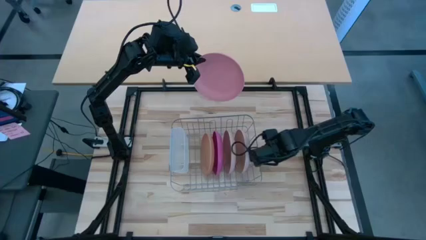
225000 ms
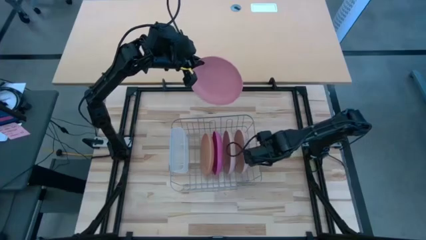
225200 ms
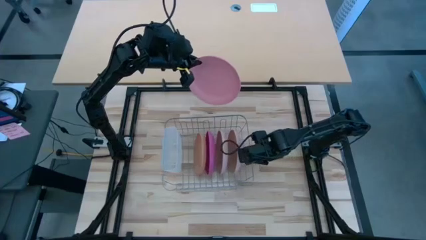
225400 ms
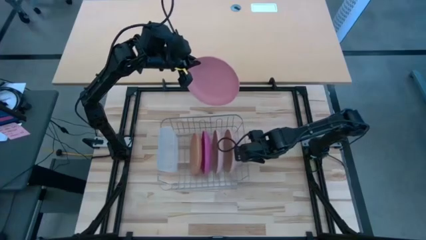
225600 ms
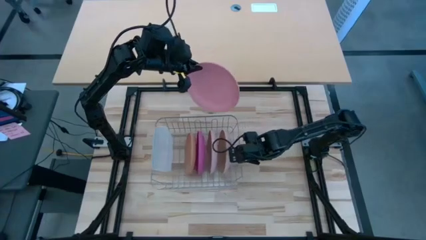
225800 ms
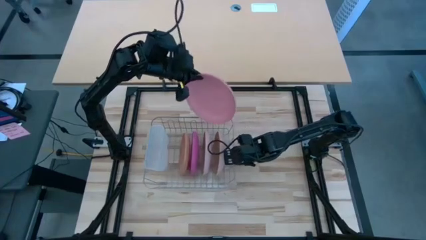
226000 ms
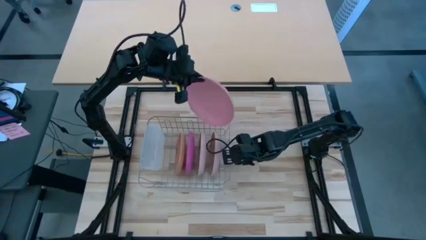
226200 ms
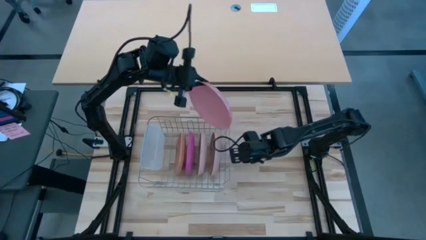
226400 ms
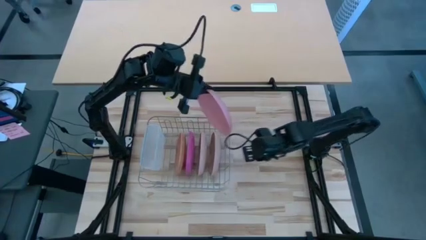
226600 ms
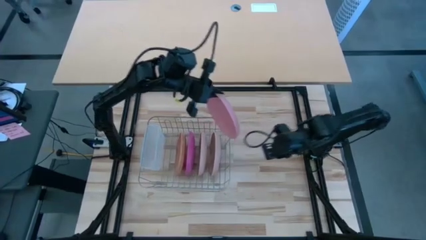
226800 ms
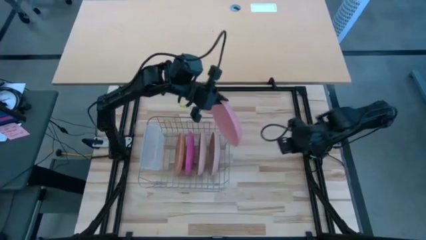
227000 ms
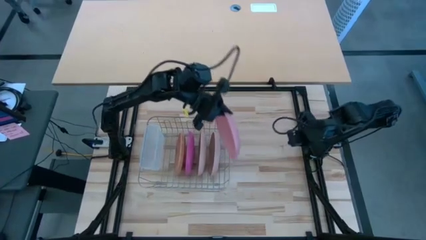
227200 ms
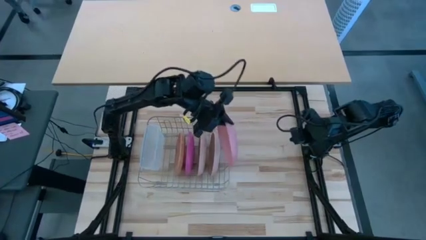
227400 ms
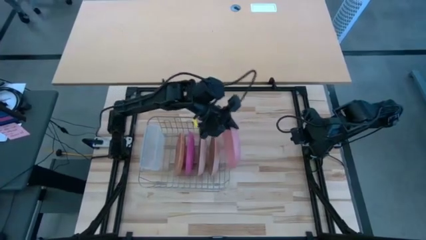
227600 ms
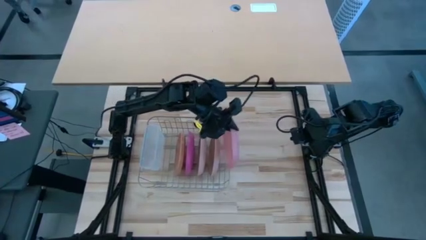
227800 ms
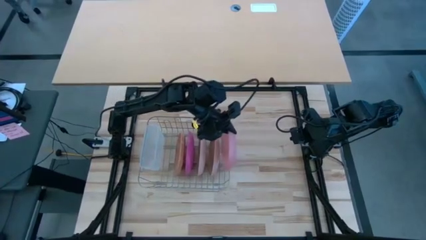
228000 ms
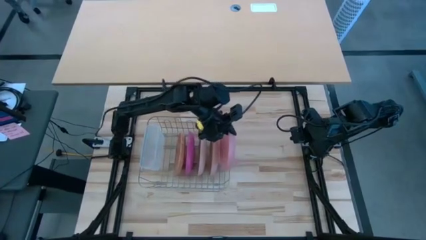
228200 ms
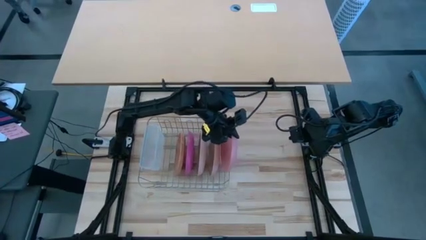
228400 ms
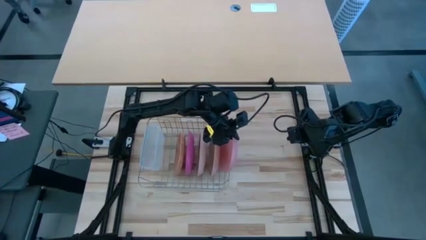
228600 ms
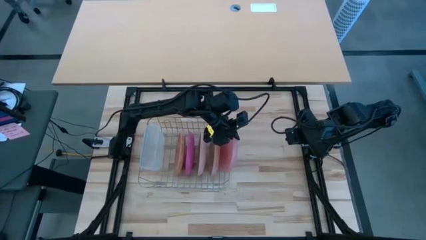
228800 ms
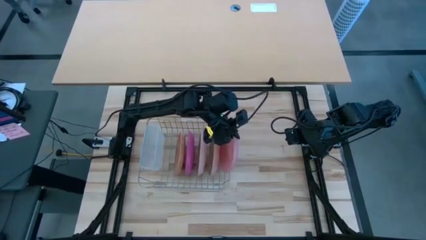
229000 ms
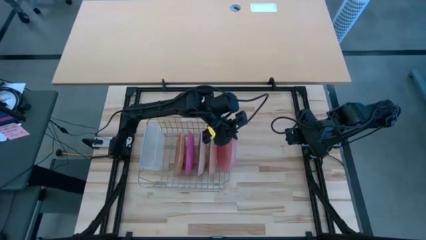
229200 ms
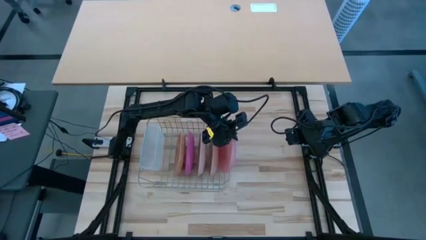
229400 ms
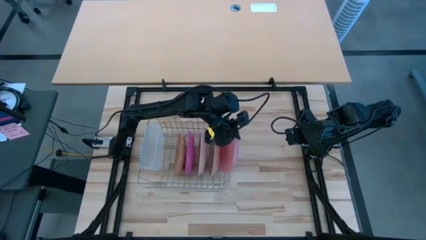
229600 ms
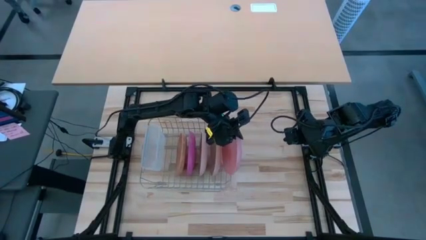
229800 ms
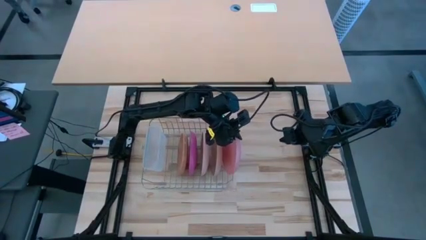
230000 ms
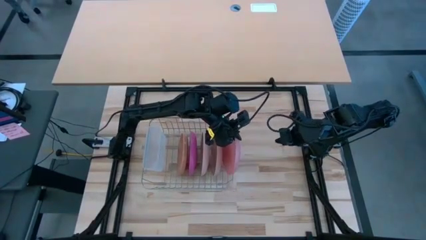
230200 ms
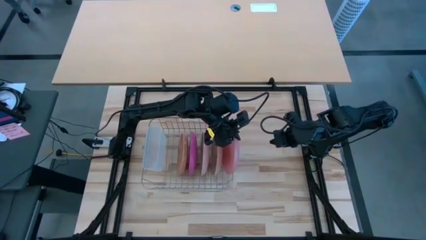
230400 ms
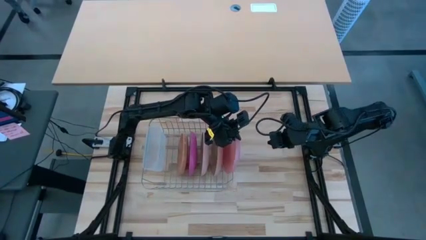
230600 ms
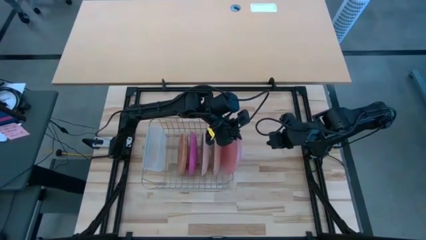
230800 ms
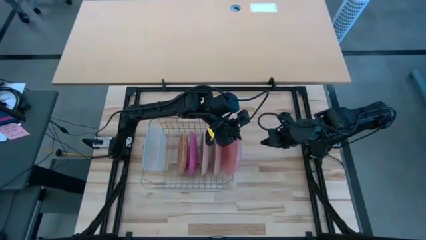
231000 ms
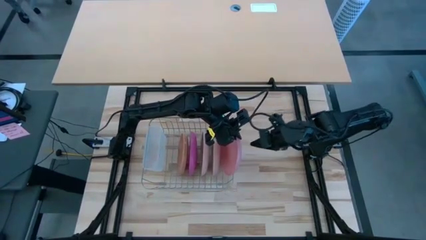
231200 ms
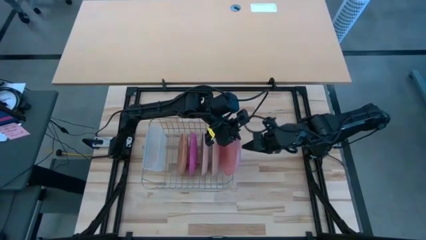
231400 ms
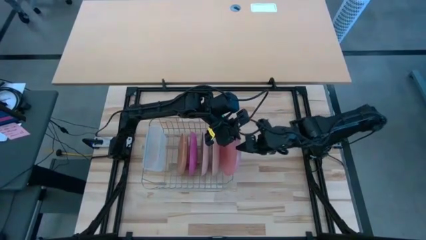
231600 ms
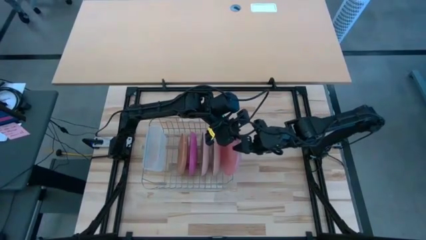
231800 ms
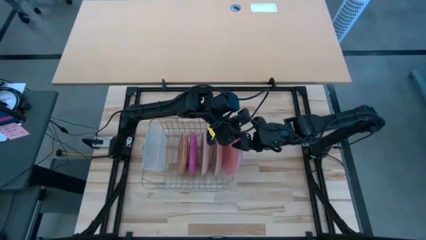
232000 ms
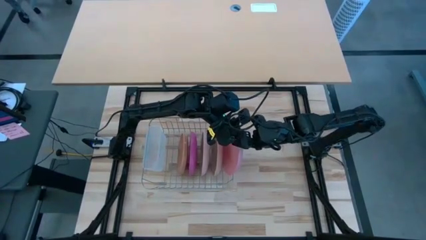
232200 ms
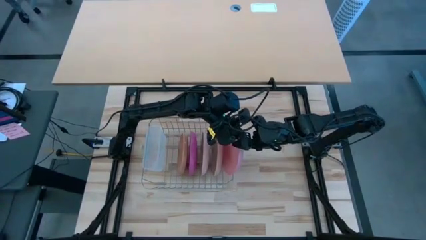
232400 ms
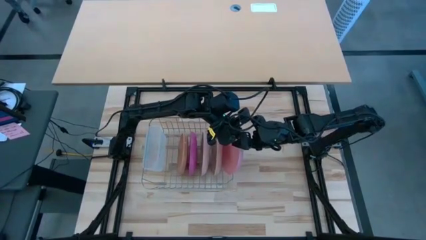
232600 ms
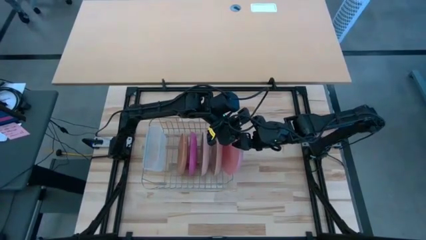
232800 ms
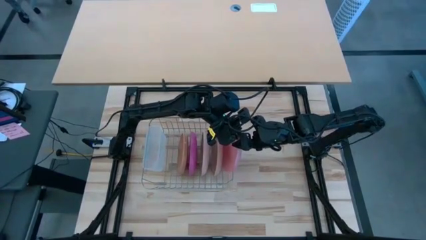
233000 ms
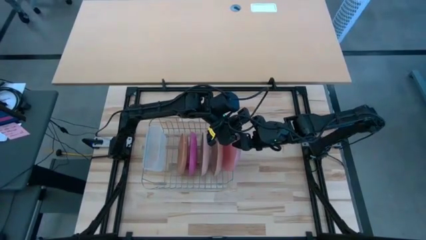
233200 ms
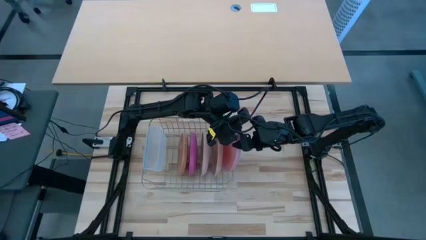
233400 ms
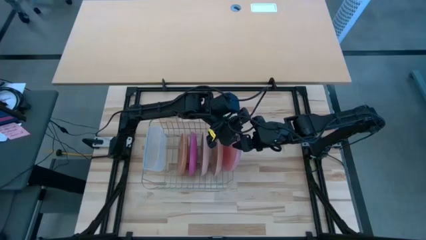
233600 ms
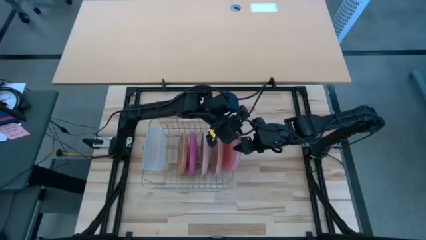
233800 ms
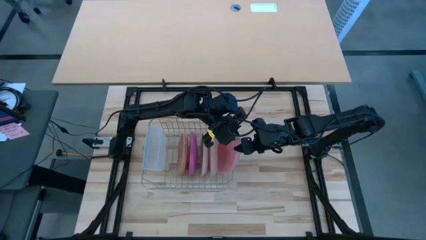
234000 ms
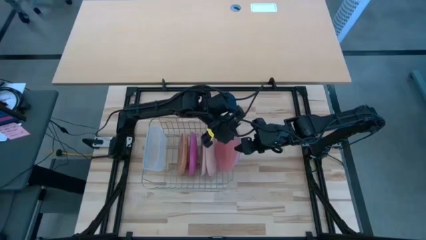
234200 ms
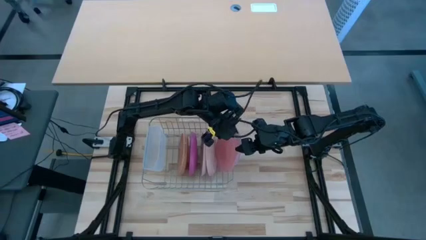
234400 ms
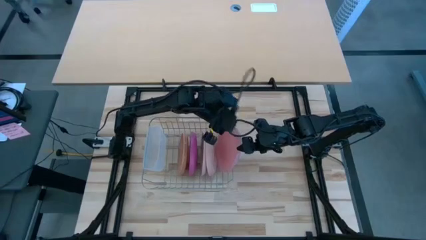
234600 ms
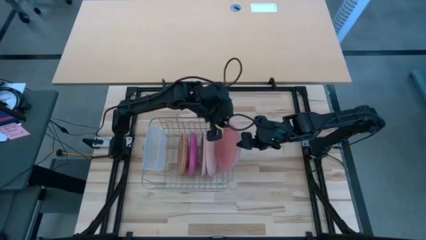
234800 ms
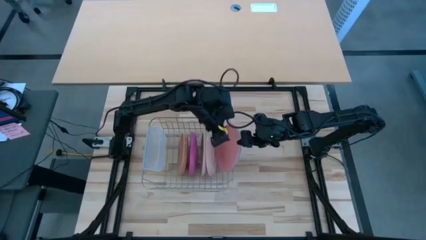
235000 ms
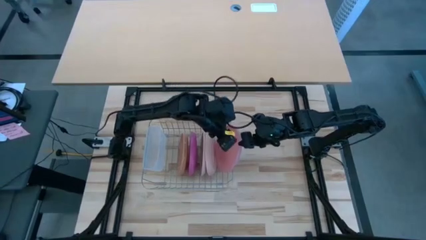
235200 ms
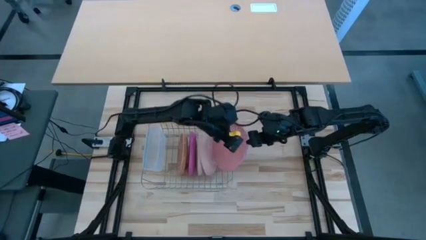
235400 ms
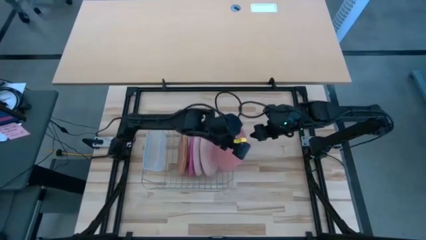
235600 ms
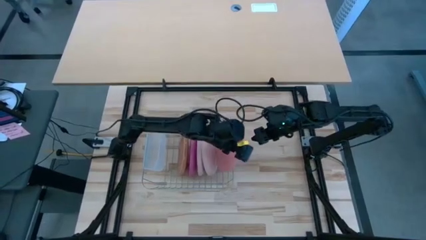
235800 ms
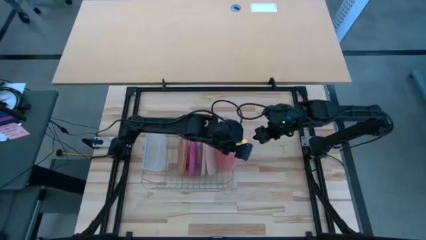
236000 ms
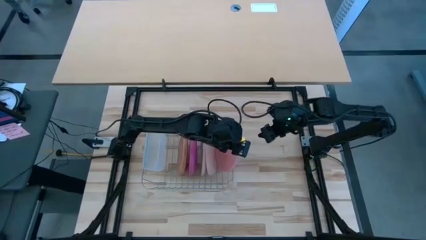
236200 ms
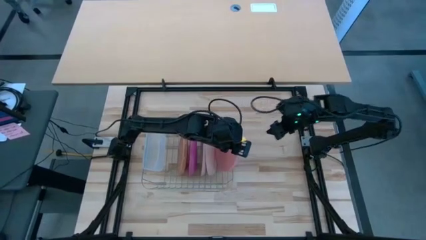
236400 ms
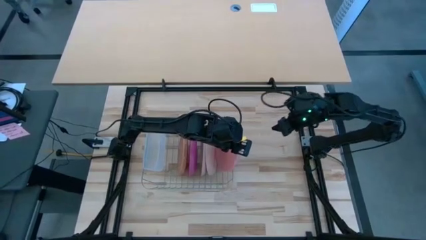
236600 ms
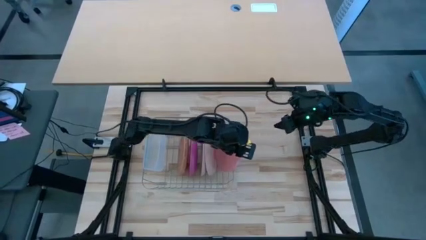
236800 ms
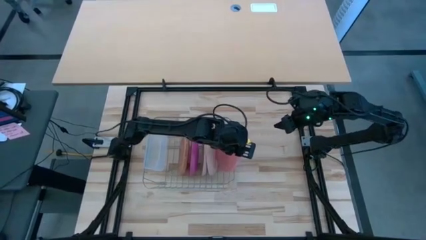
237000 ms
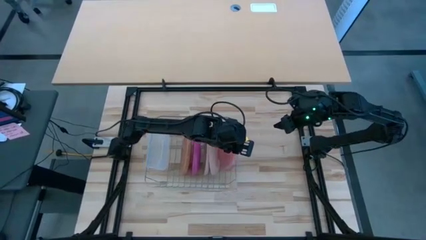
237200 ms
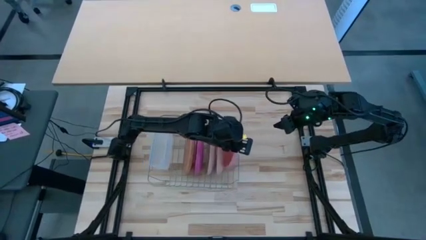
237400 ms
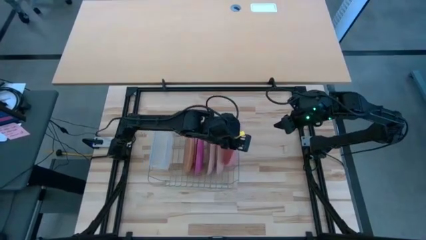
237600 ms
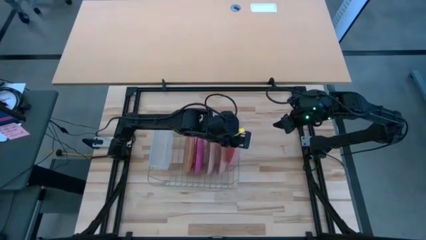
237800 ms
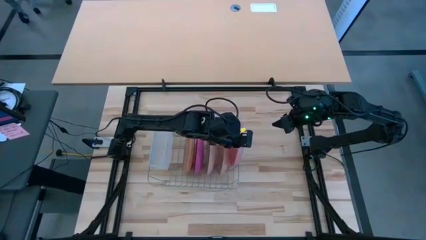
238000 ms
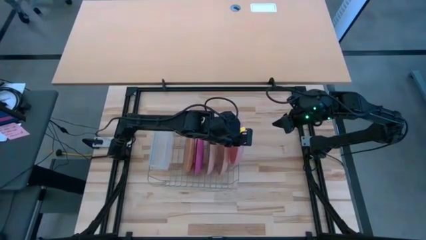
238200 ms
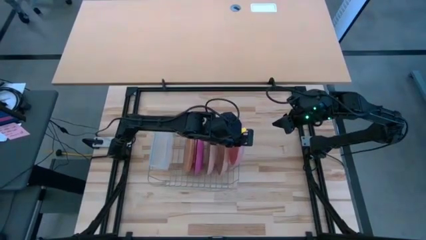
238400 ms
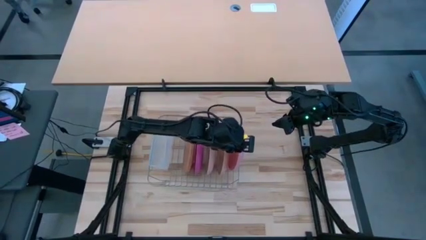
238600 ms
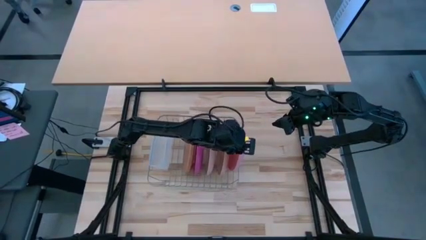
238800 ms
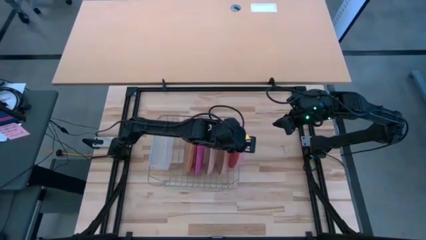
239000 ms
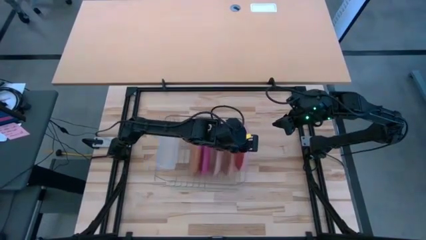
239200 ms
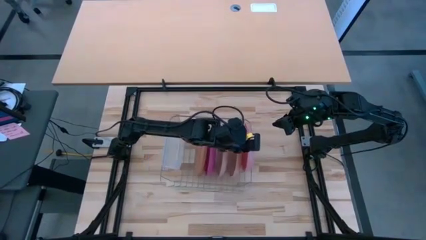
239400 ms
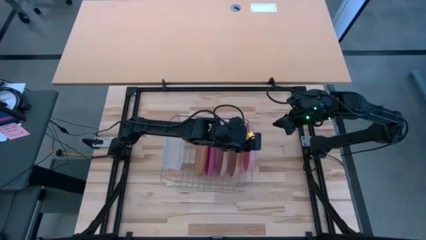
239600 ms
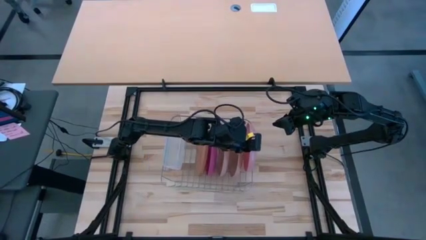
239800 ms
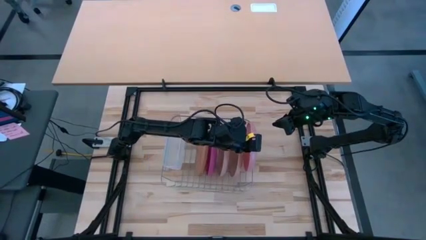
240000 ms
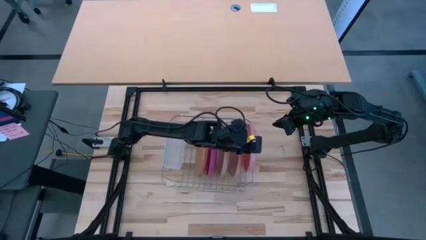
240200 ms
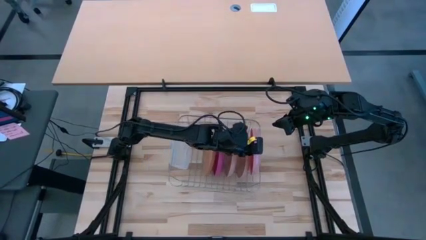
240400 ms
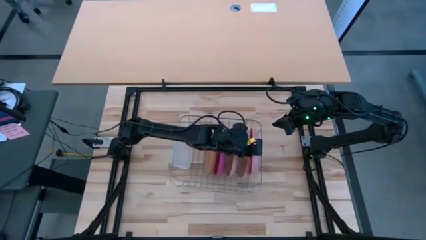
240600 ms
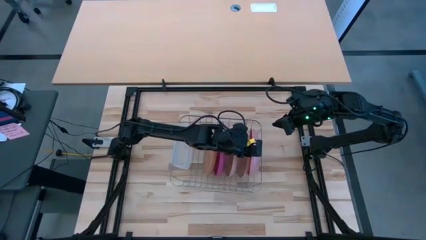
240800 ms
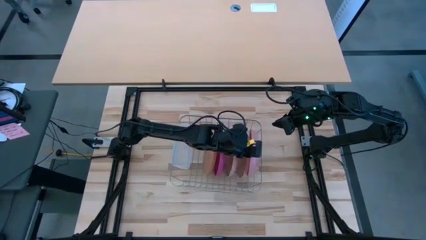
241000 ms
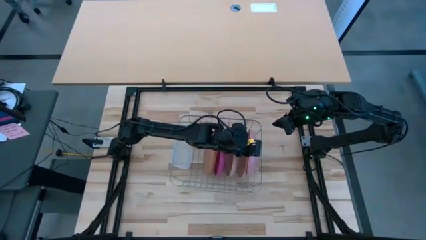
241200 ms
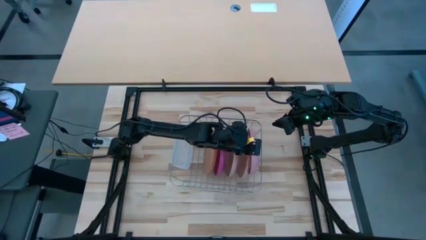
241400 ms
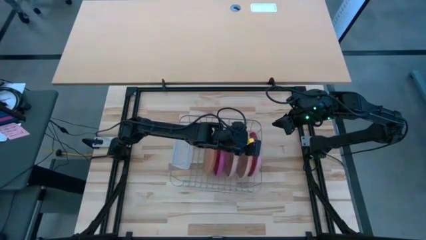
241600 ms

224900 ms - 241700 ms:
Task: Sort dishes
Put the light pink plate in the dish rack
